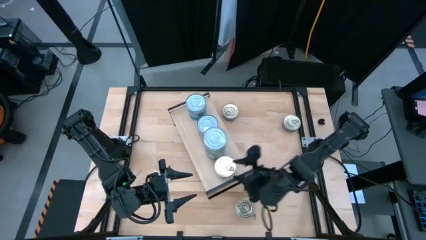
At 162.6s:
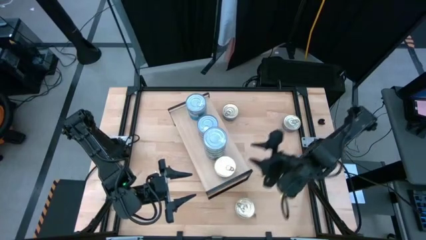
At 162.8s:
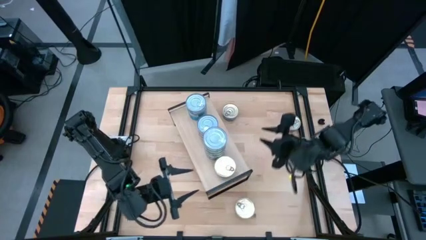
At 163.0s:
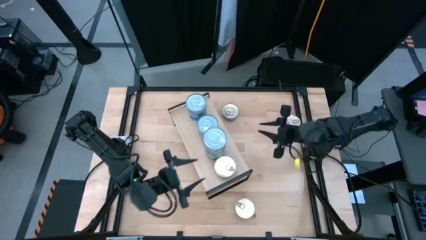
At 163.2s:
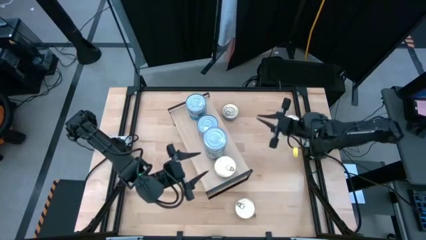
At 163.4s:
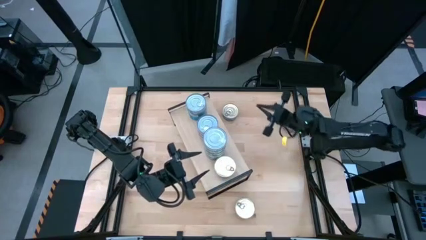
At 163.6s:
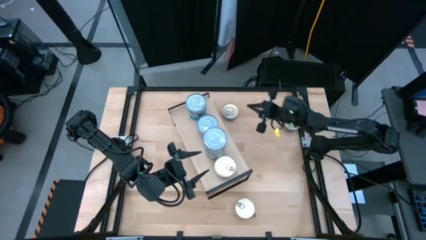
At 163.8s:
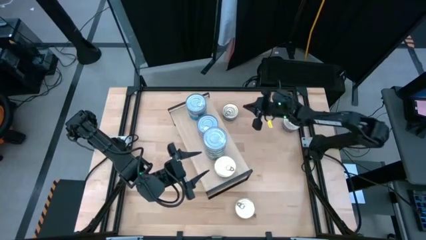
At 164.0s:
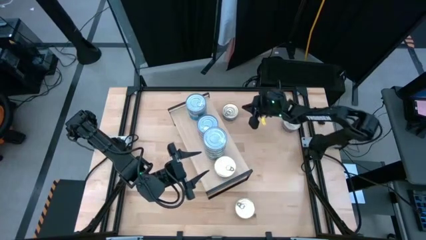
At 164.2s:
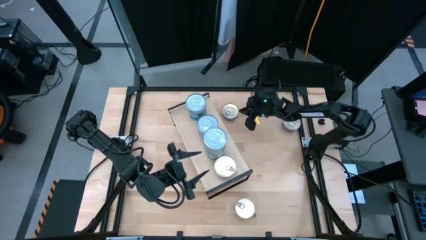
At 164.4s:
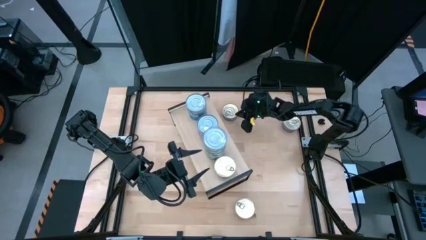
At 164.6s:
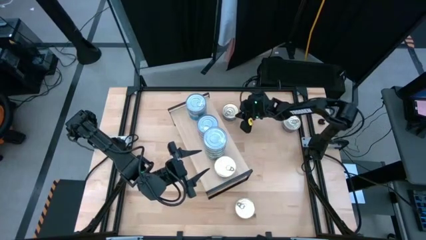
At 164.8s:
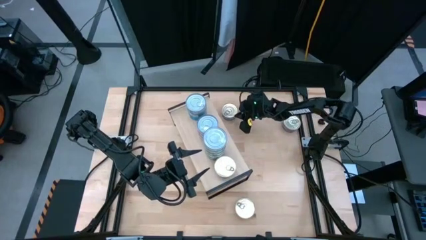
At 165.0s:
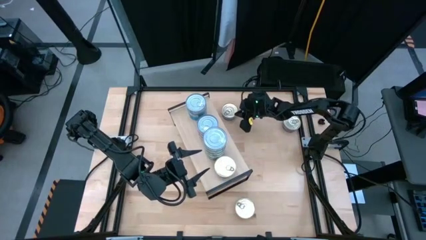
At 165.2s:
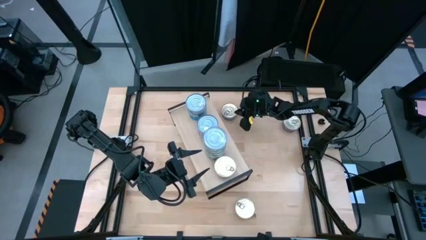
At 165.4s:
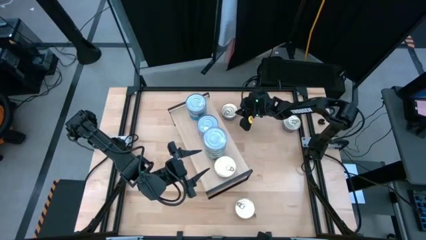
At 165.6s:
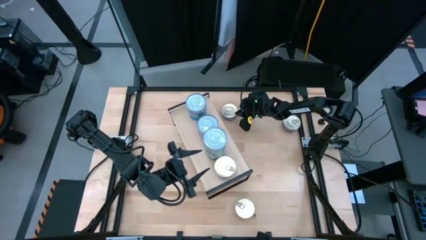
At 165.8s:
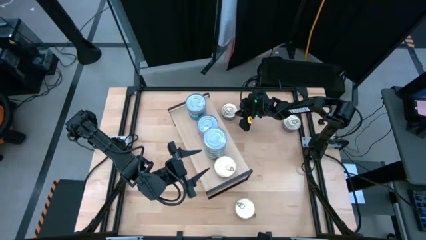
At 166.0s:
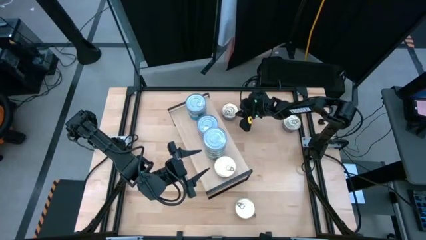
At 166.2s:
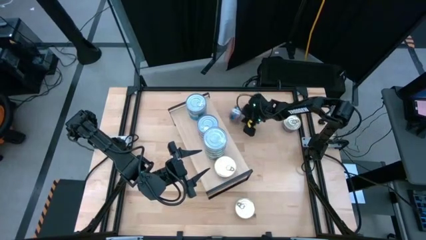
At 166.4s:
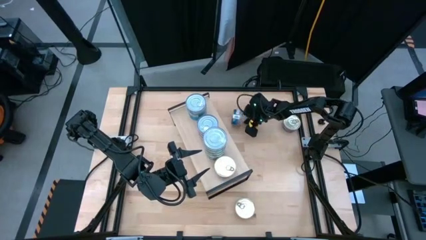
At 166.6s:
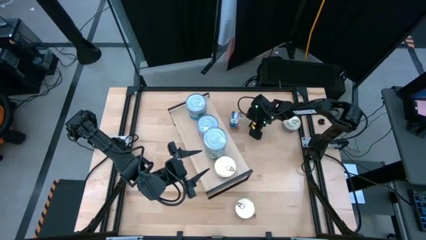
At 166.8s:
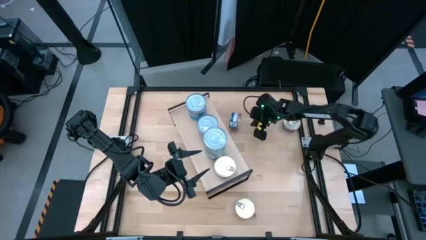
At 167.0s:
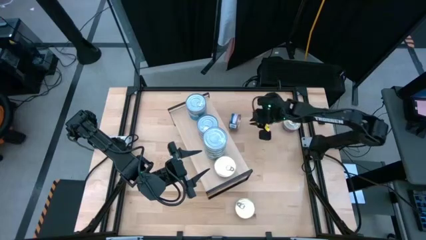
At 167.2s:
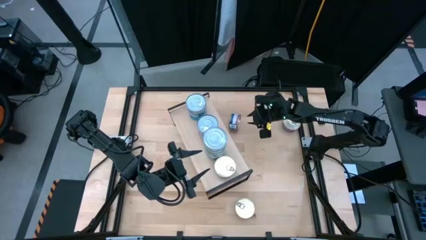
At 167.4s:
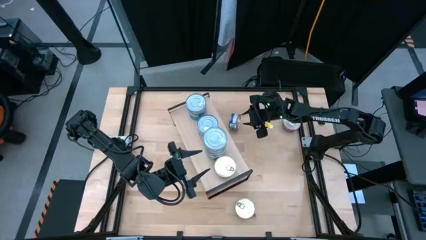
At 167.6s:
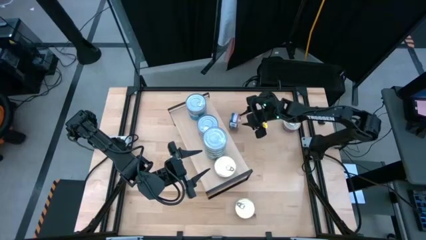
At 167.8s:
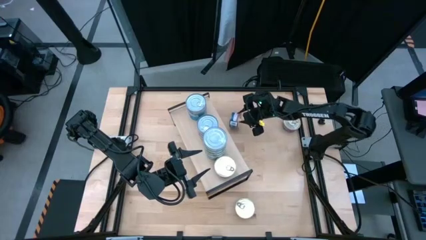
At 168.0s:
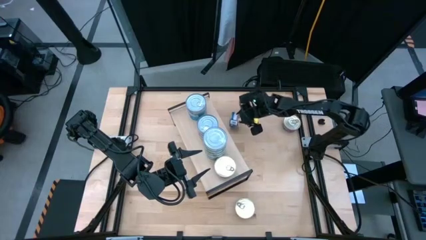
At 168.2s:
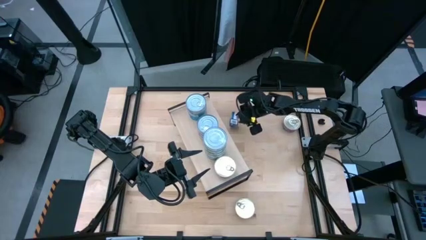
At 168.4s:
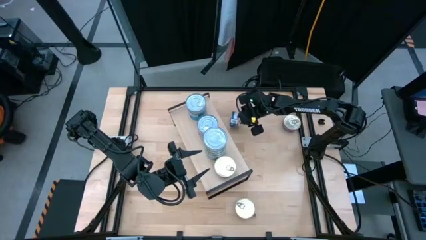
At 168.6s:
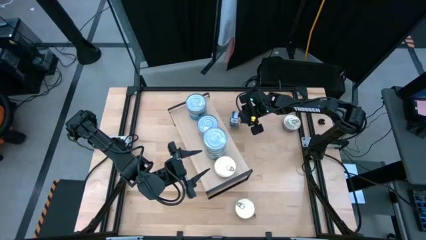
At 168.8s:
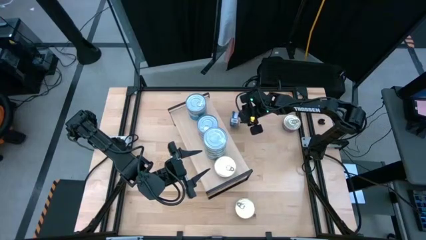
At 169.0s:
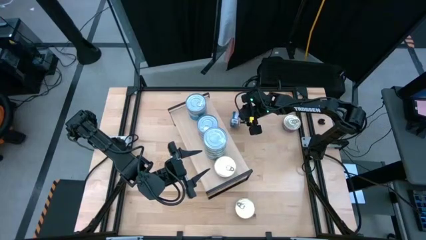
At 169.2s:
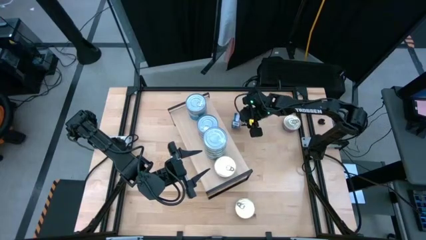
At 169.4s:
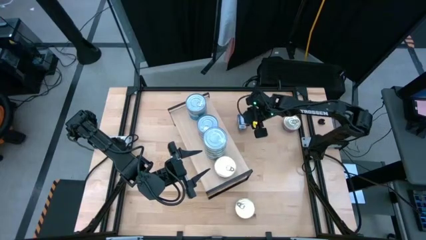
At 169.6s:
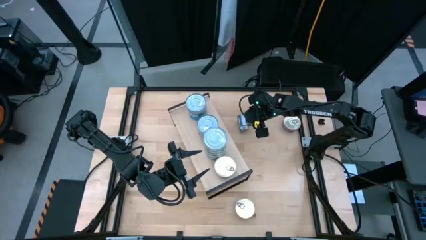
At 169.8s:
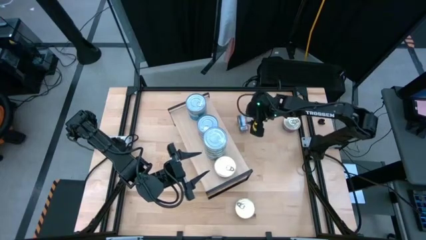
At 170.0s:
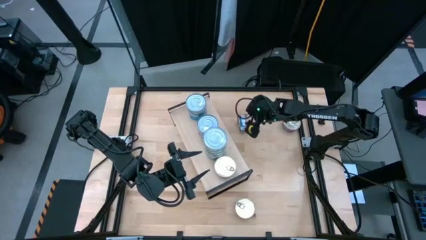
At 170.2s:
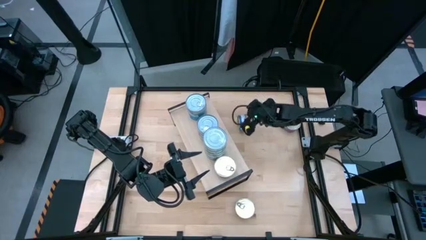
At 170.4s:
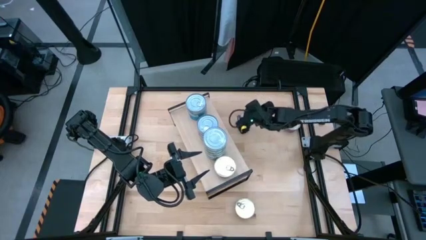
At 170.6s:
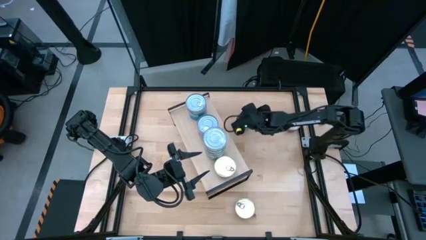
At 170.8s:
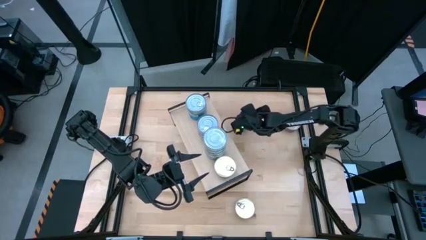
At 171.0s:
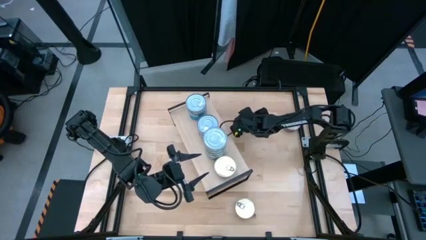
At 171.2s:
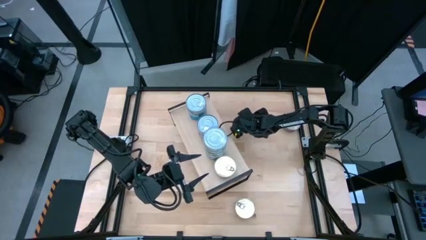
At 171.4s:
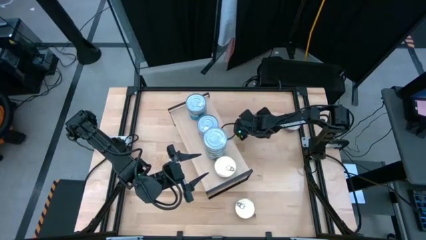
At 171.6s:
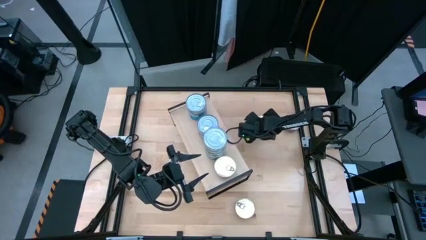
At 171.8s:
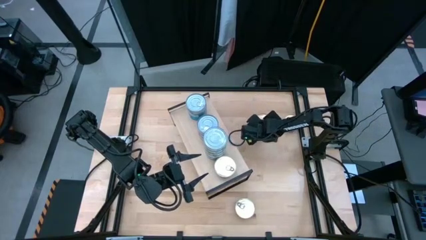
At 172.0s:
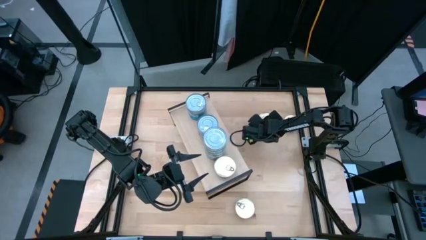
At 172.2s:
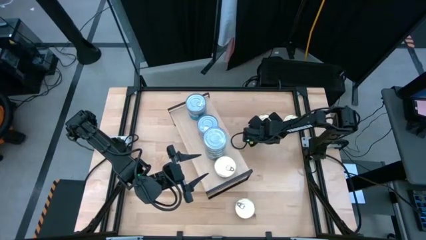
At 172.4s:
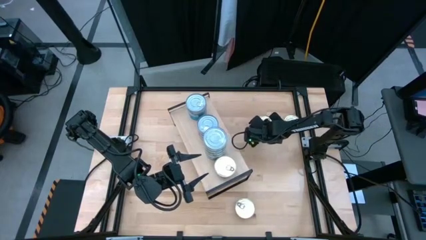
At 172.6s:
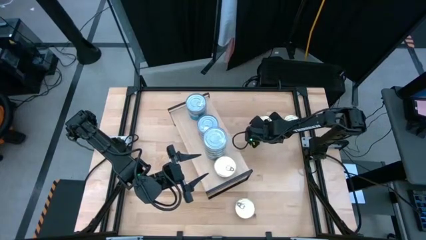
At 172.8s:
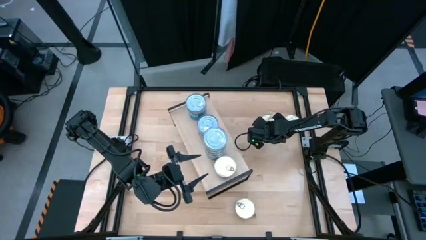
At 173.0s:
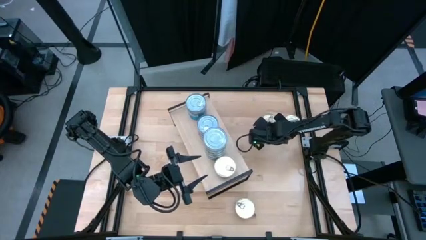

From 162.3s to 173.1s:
Task: Stack canned seafood by type on shelf
Stack the blue-pink tuna can on top of the blue-pink tuna can on the shelf

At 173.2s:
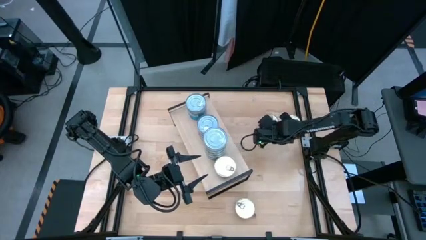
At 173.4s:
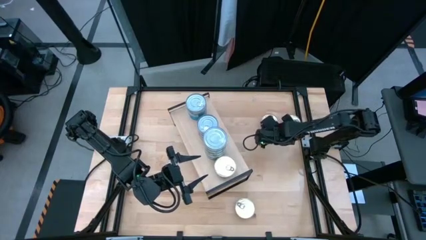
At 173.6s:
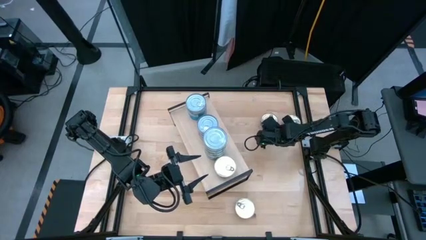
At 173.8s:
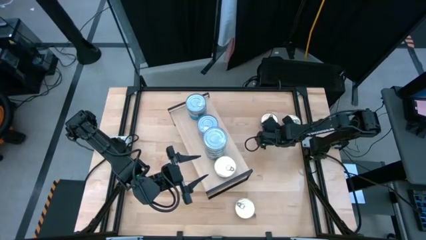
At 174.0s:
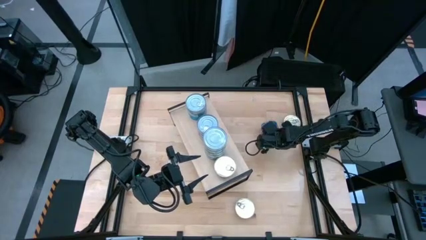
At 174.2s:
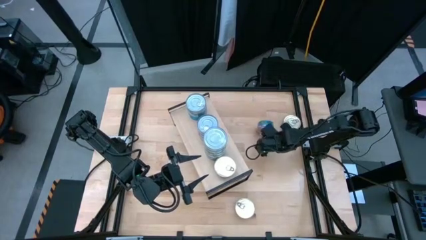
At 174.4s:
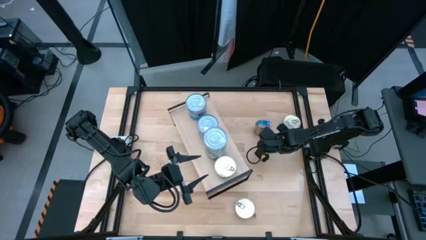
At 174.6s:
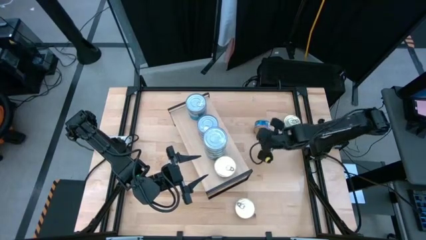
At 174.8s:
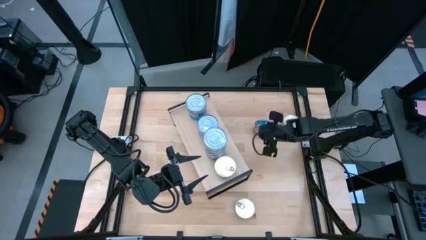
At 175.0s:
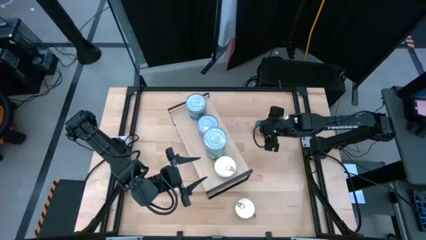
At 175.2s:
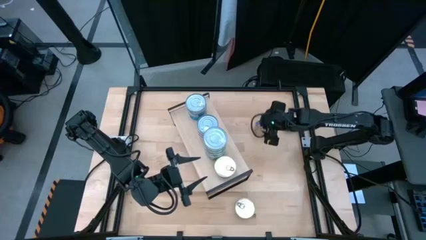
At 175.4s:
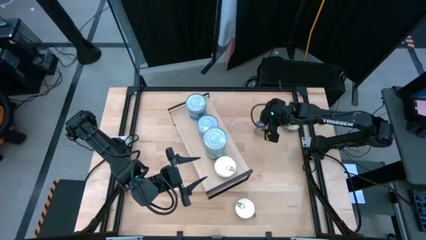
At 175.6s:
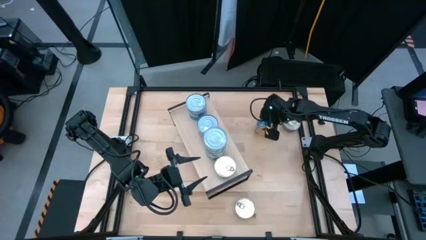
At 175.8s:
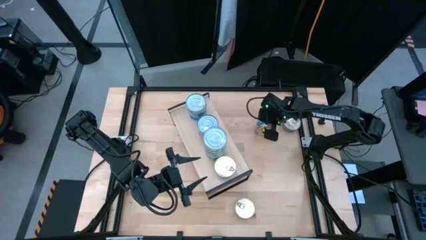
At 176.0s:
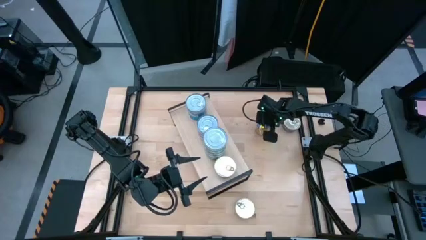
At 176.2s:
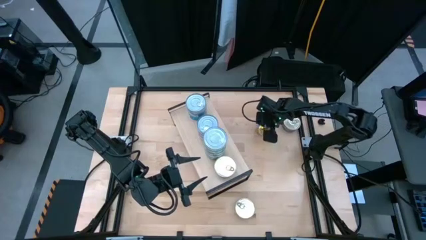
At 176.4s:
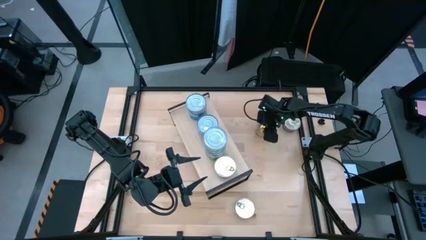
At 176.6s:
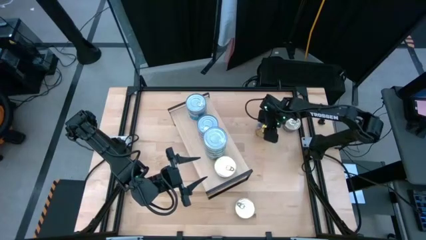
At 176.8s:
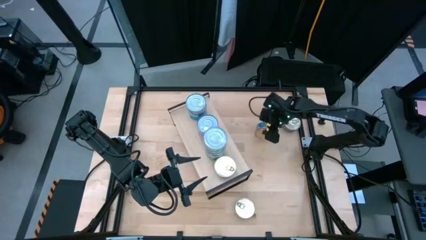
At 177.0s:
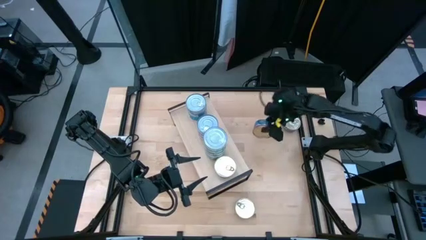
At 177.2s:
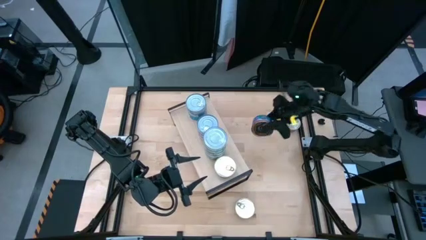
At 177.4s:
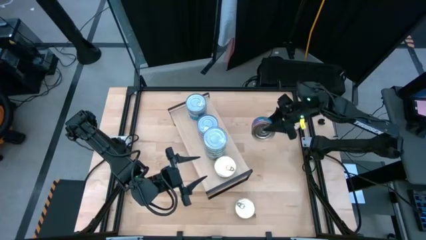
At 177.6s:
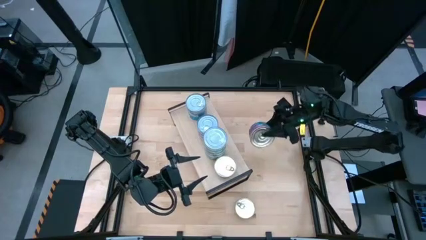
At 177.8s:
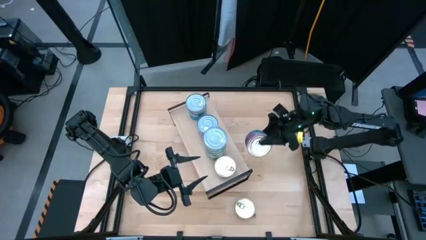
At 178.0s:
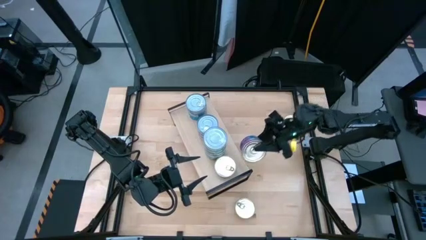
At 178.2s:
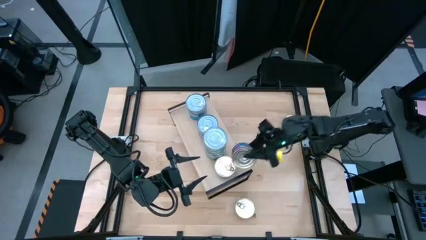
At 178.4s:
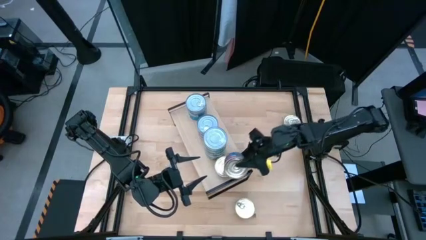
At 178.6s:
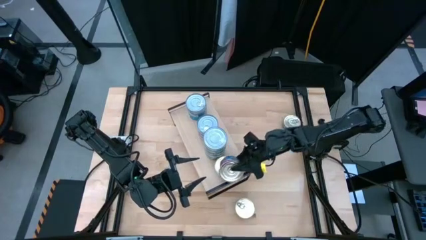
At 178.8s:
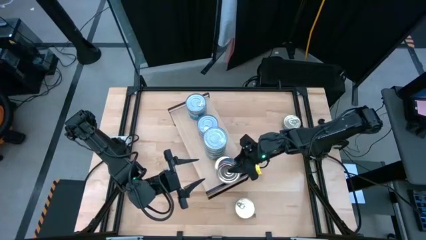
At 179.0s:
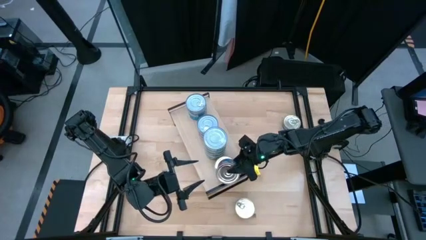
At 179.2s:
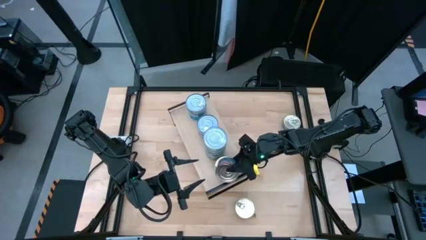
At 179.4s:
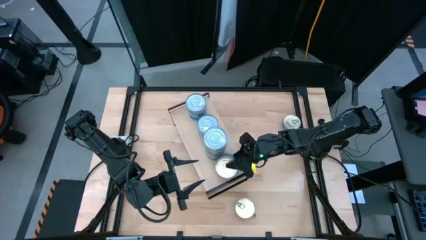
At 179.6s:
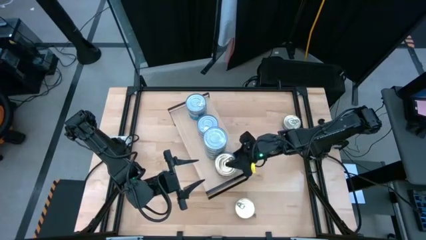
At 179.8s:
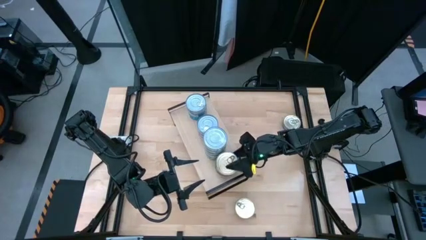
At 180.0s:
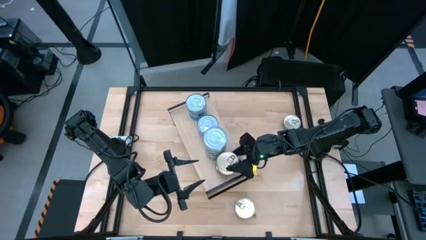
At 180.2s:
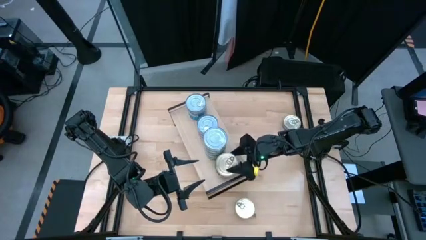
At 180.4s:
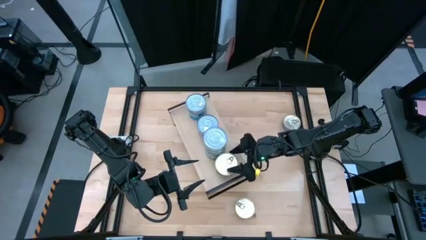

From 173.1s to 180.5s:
Stack the blue-pink tuna can on top of the blue-pink tuna can on the shelf
